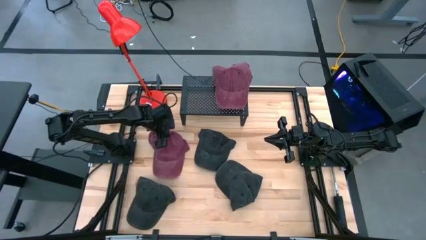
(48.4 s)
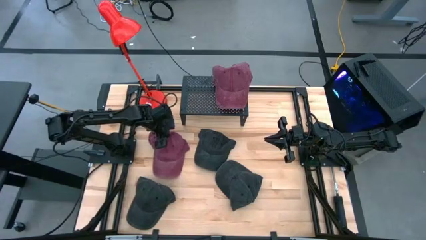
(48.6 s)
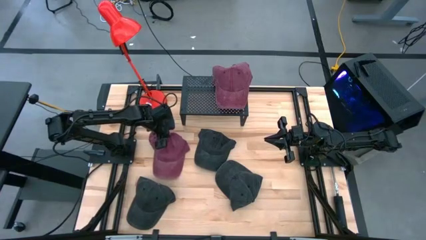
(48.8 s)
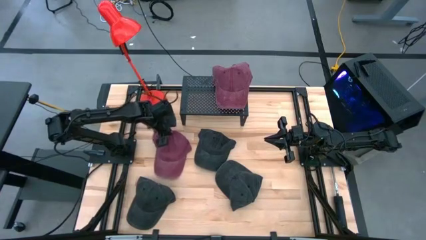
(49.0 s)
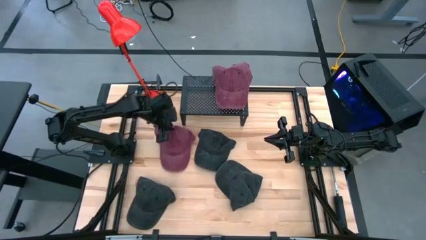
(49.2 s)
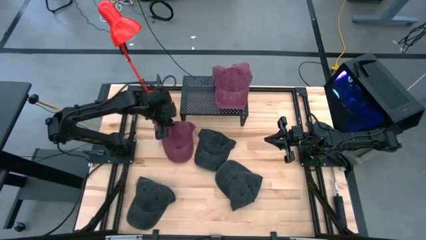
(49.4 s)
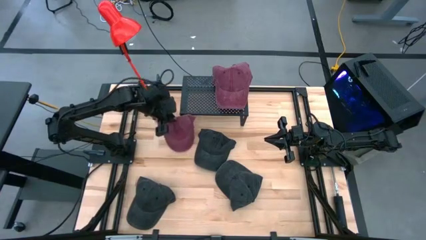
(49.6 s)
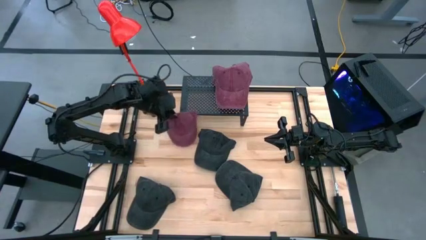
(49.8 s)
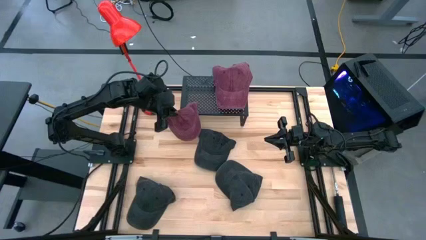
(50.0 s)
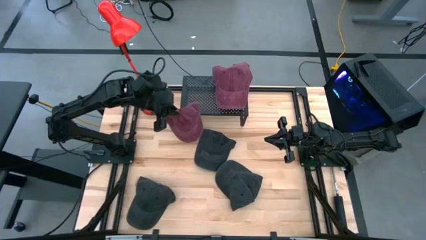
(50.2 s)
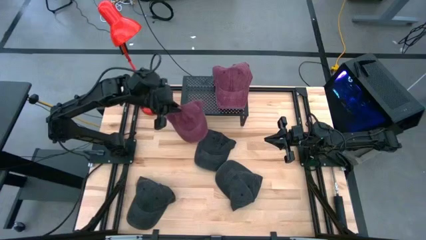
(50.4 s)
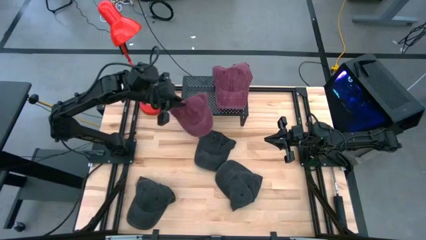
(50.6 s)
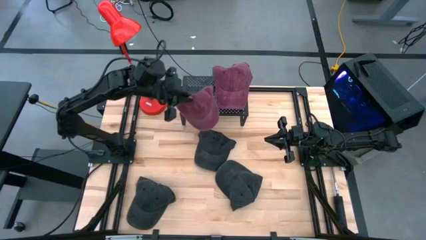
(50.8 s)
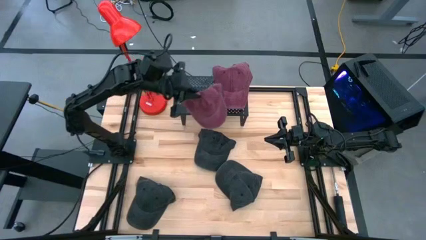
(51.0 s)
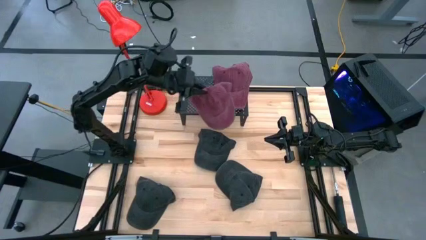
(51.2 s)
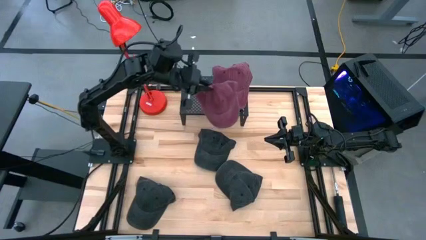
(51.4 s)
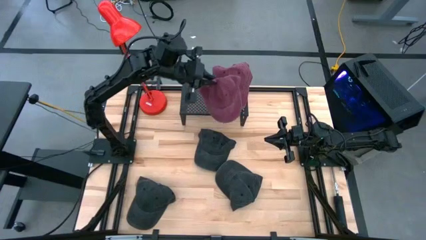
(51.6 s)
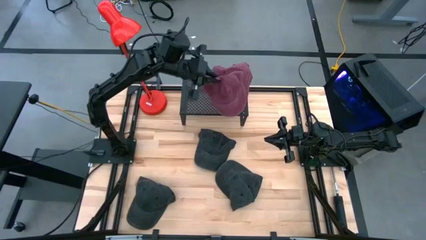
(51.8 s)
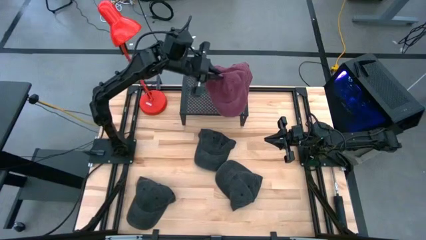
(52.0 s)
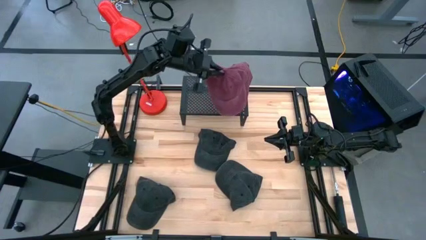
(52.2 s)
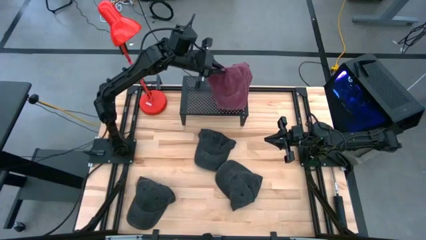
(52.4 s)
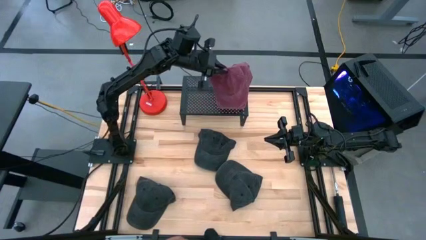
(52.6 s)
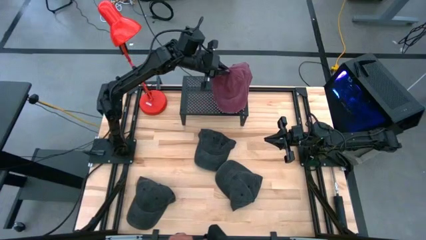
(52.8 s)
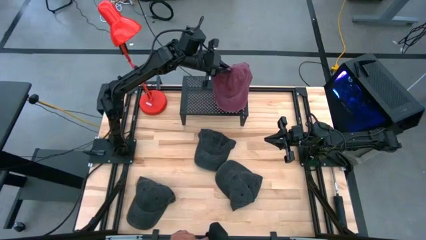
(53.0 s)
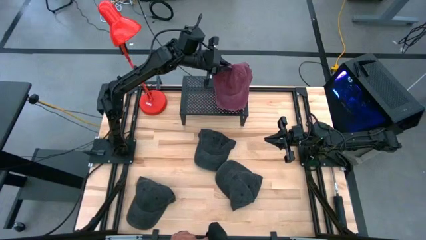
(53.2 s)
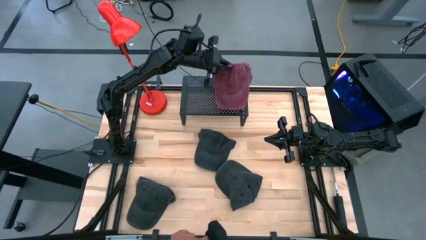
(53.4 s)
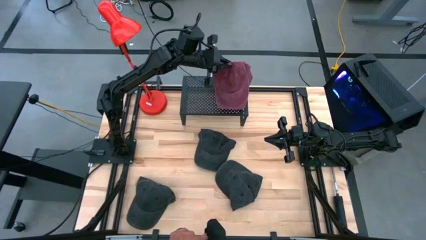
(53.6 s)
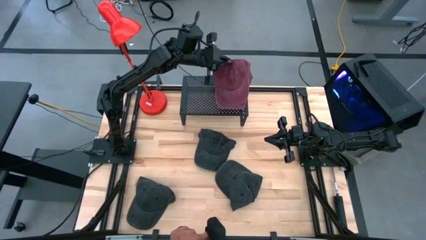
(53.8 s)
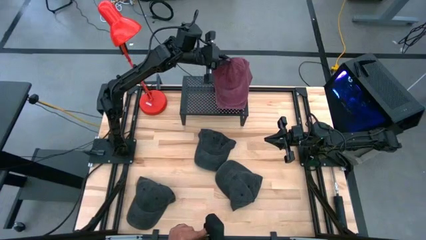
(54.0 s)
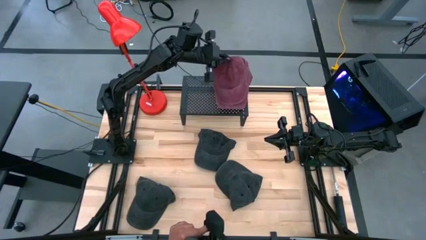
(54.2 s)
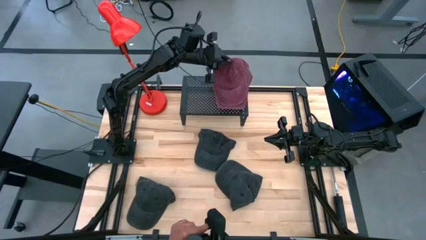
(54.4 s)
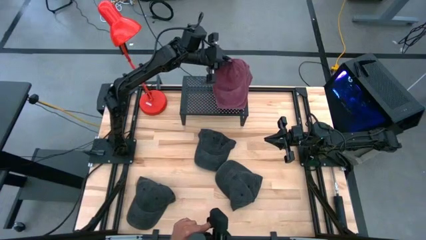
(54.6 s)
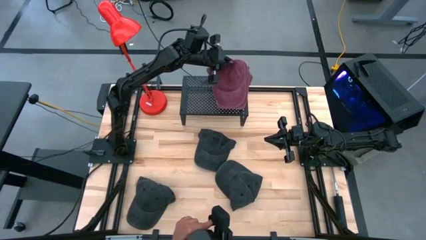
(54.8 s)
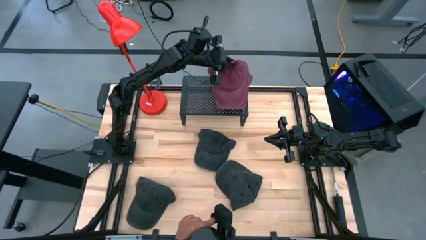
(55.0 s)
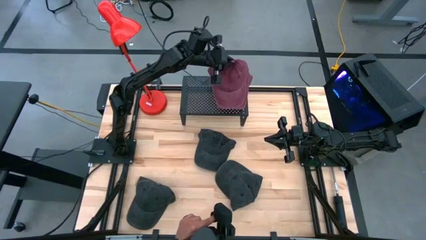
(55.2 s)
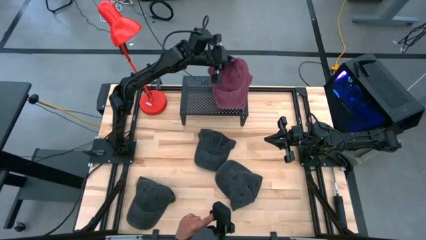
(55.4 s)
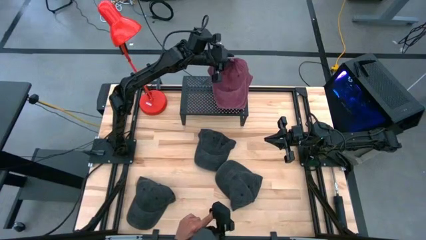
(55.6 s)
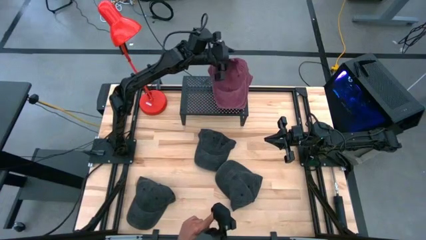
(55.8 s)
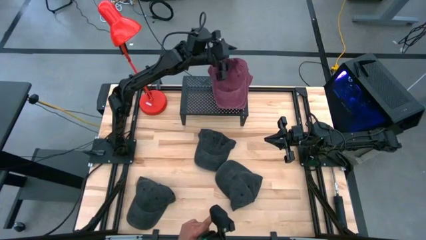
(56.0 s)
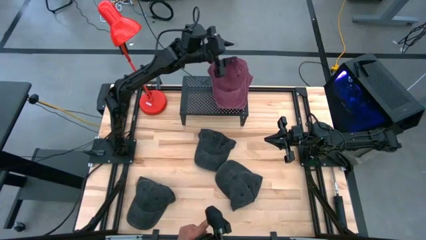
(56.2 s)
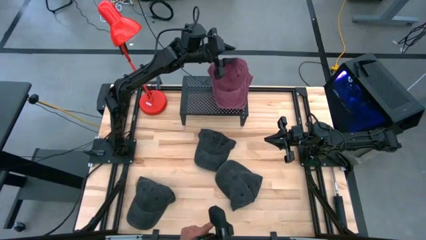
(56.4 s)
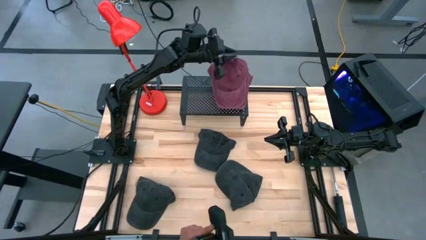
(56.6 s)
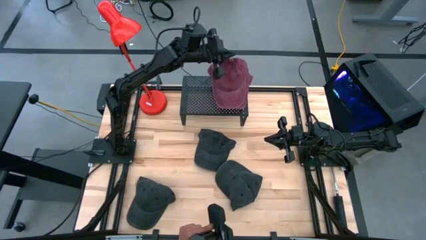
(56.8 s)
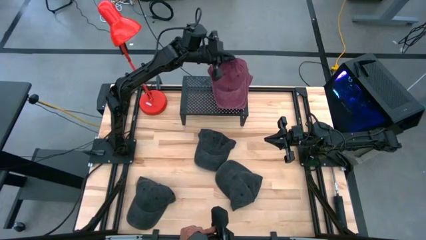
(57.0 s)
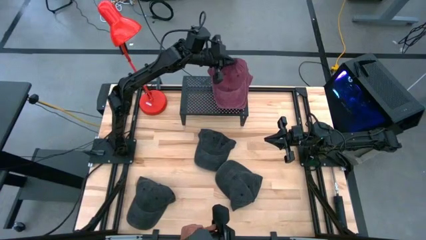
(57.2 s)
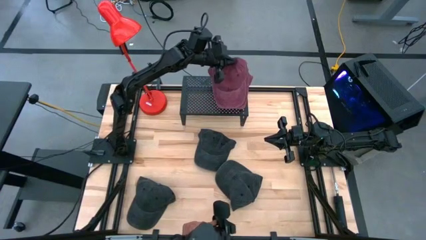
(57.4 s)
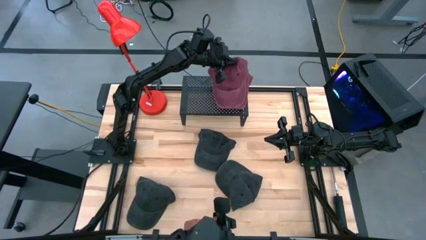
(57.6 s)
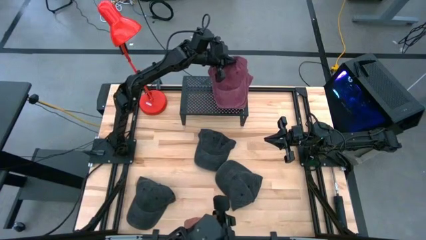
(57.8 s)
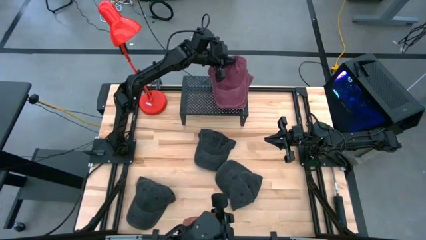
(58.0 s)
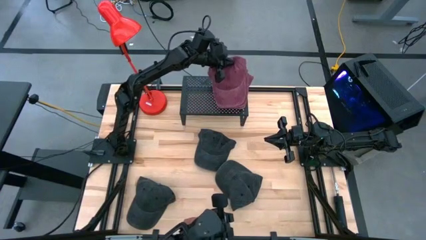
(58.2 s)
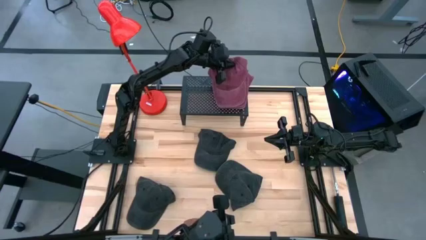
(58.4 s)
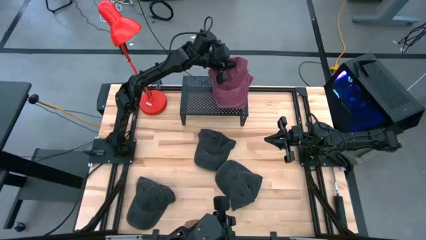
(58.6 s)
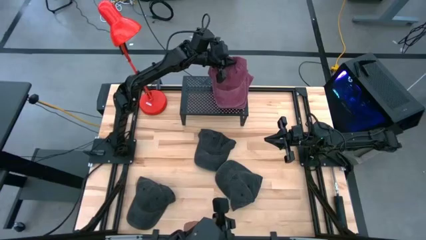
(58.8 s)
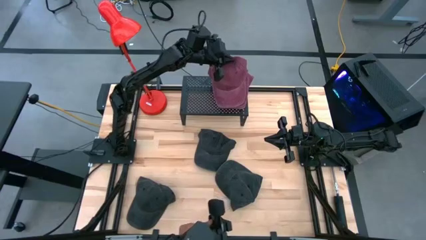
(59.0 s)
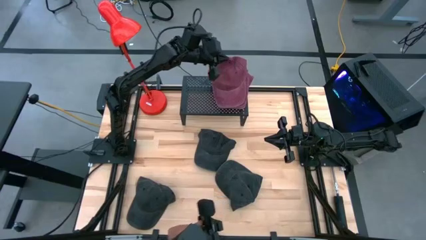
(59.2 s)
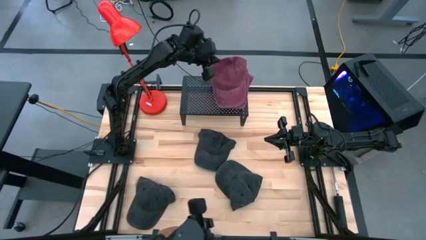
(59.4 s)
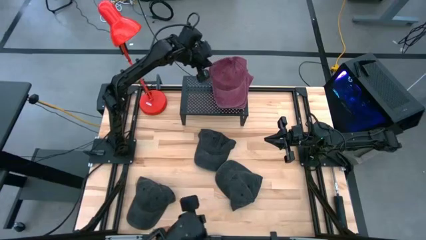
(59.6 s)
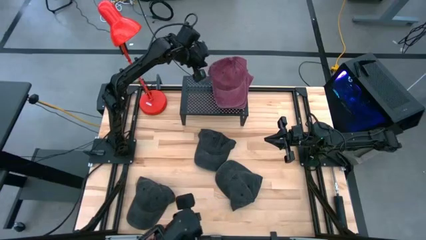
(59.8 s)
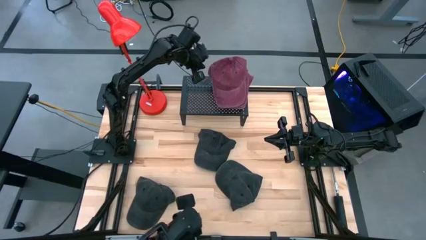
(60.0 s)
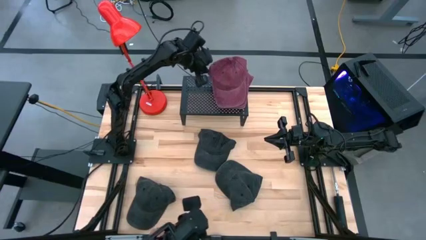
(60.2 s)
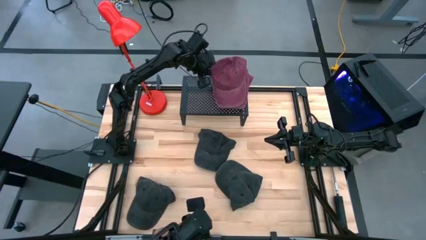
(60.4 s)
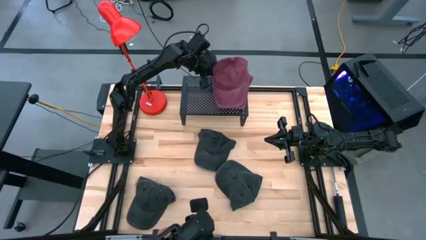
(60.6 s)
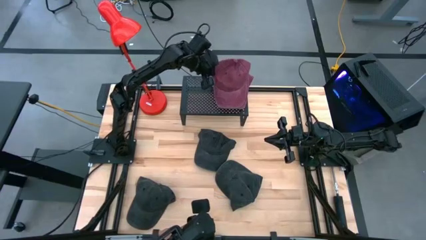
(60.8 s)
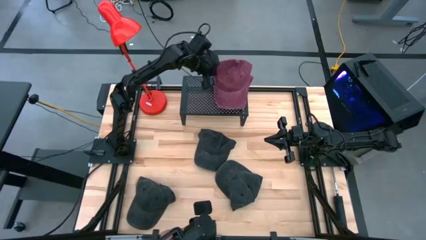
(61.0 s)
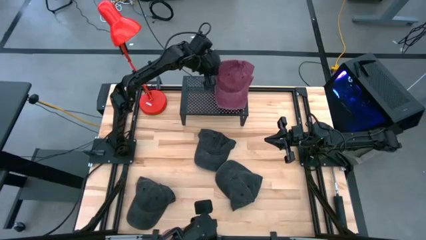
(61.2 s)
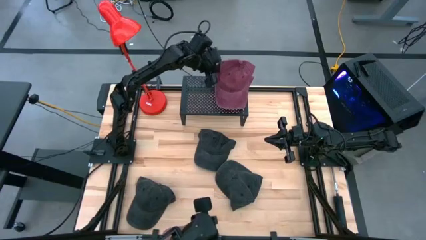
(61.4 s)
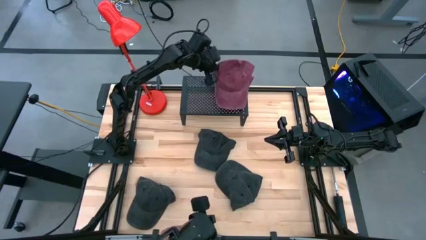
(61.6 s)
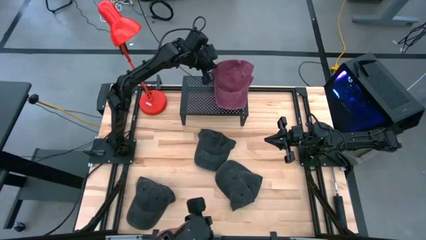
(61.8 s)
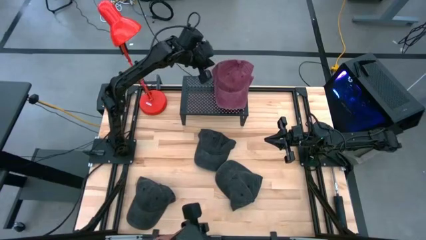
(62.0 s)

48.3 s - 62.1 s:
Task: Pick & Place hat
Stack the red cap on top of the red cap on the shelf
